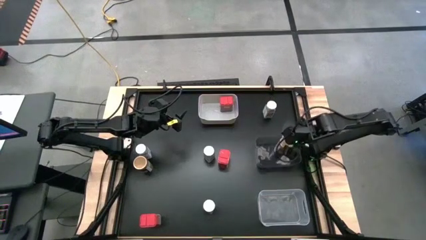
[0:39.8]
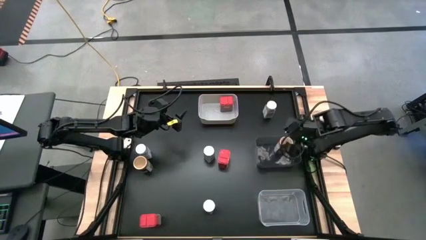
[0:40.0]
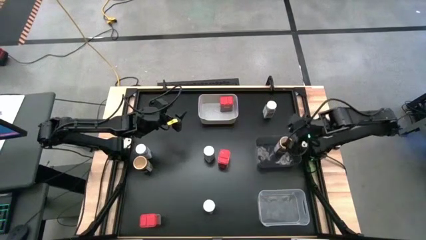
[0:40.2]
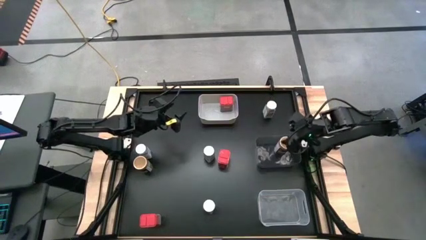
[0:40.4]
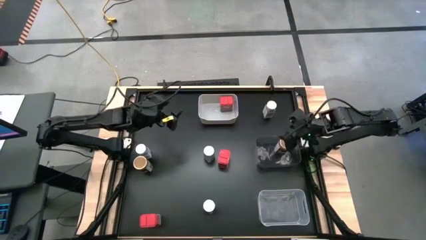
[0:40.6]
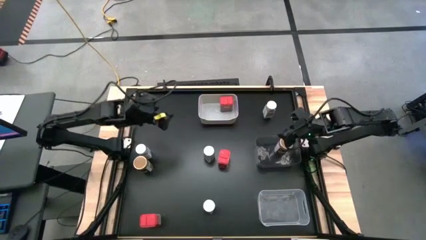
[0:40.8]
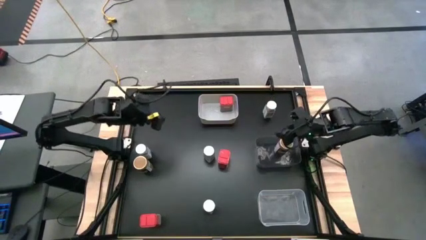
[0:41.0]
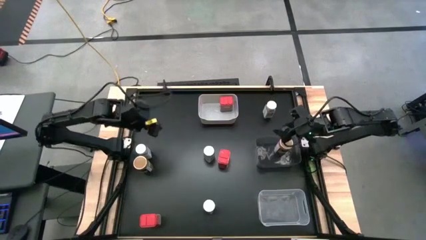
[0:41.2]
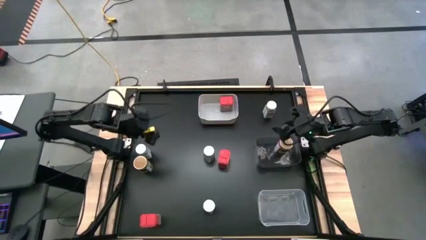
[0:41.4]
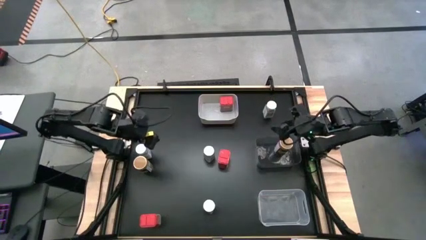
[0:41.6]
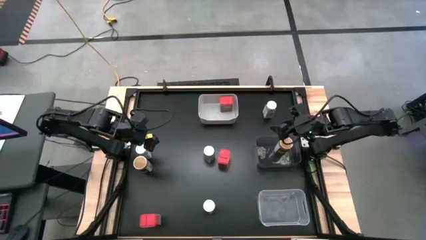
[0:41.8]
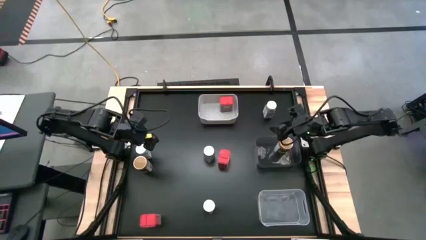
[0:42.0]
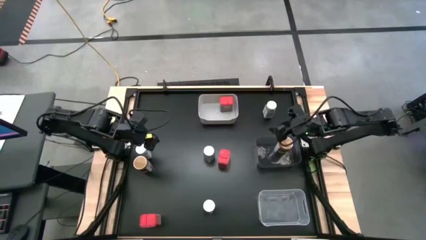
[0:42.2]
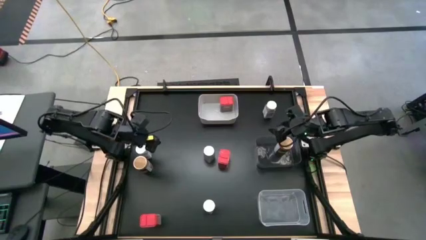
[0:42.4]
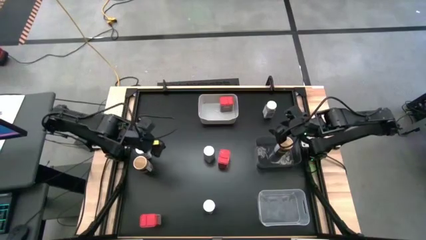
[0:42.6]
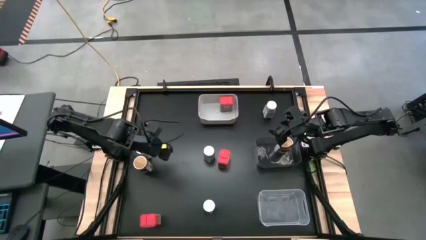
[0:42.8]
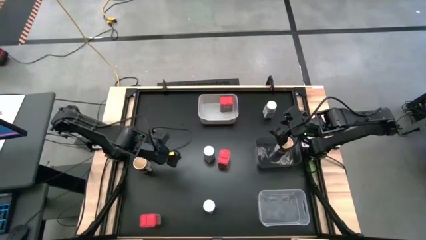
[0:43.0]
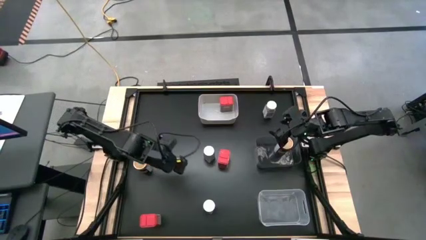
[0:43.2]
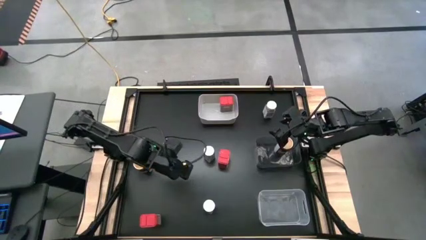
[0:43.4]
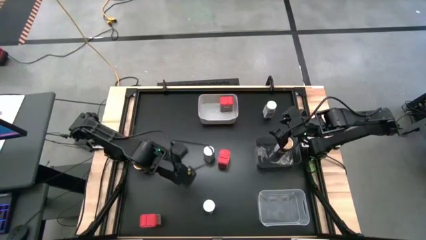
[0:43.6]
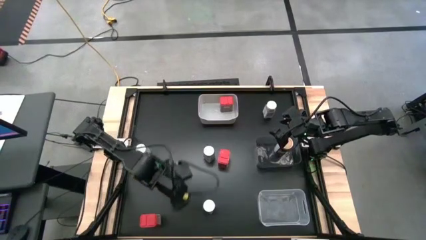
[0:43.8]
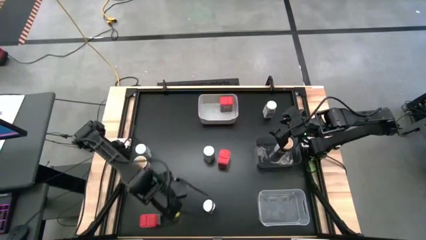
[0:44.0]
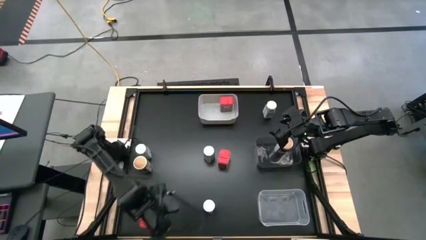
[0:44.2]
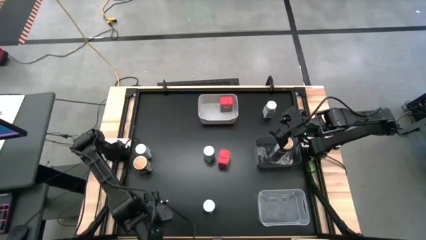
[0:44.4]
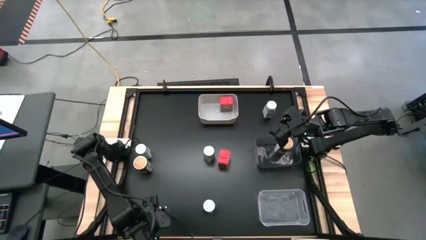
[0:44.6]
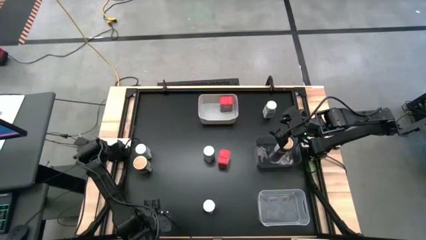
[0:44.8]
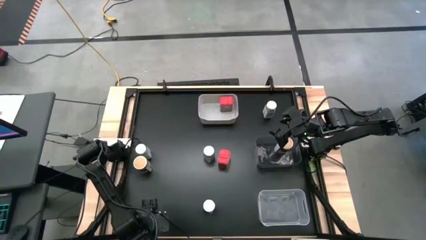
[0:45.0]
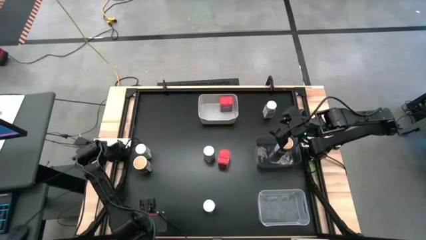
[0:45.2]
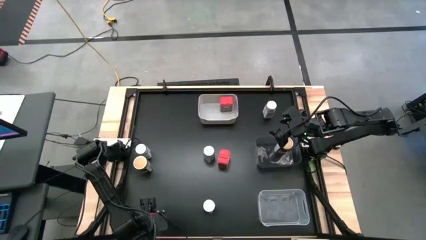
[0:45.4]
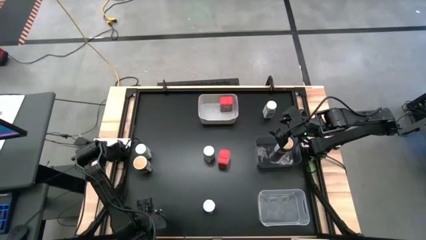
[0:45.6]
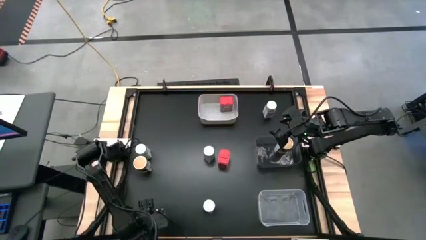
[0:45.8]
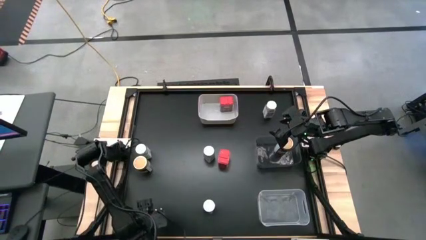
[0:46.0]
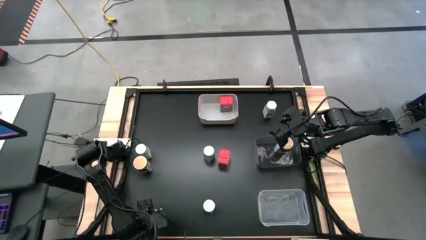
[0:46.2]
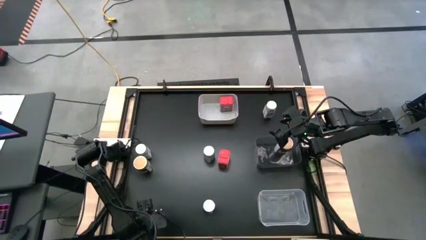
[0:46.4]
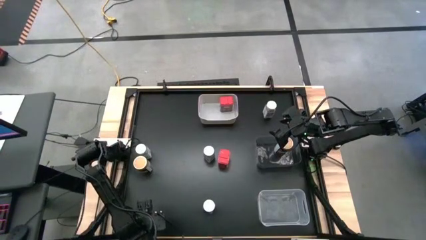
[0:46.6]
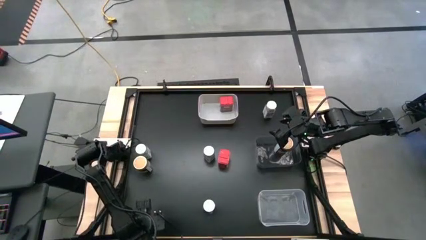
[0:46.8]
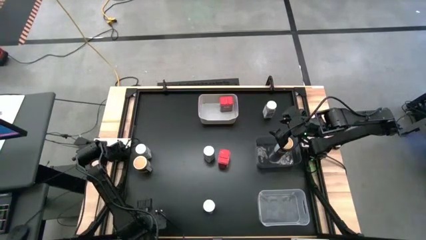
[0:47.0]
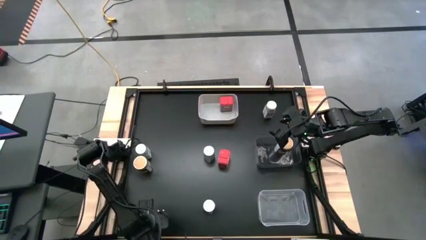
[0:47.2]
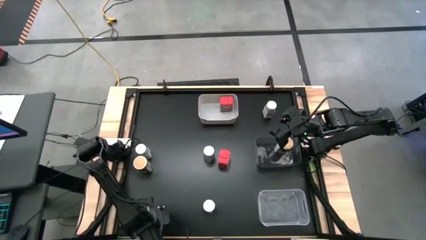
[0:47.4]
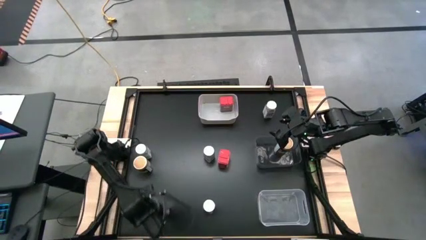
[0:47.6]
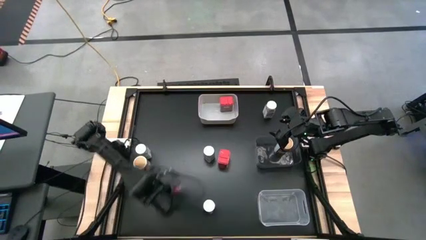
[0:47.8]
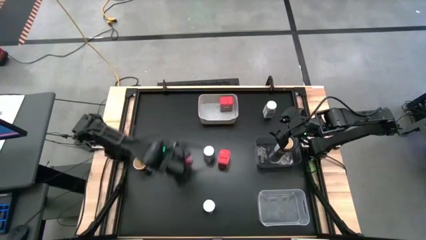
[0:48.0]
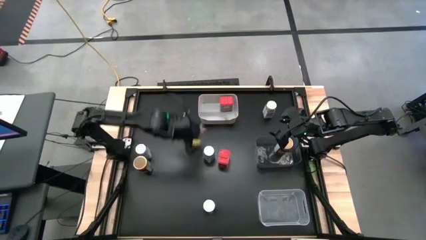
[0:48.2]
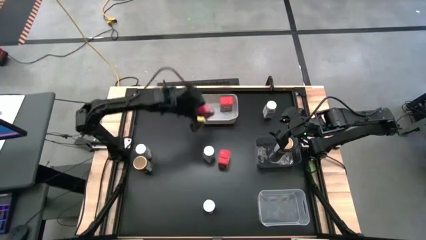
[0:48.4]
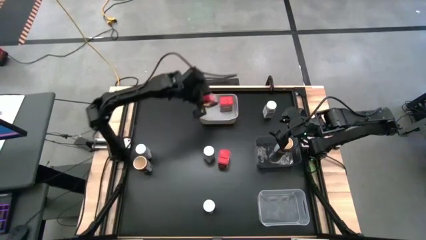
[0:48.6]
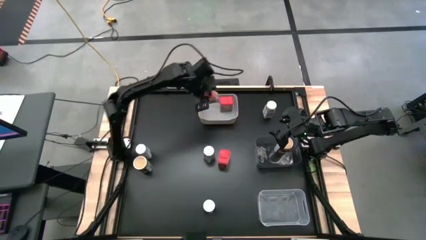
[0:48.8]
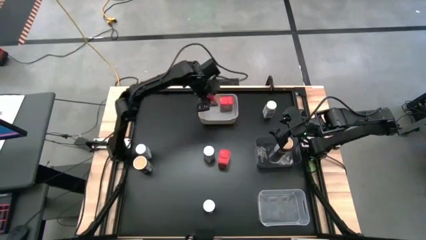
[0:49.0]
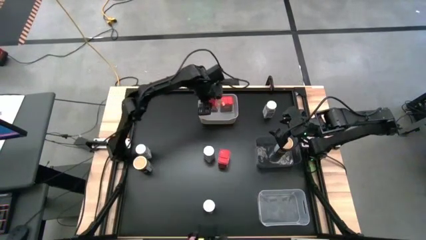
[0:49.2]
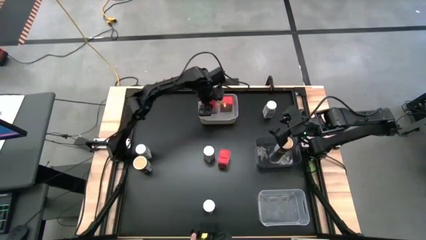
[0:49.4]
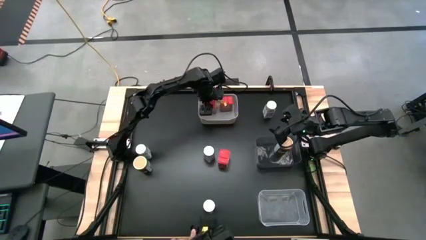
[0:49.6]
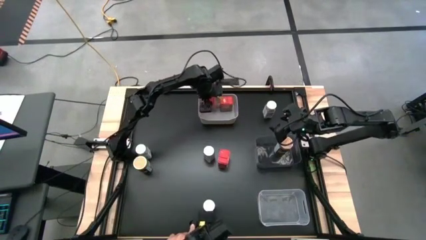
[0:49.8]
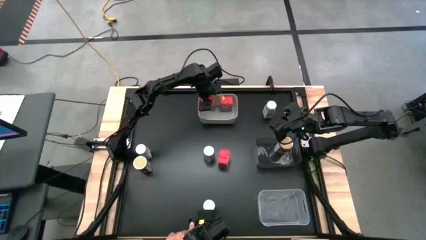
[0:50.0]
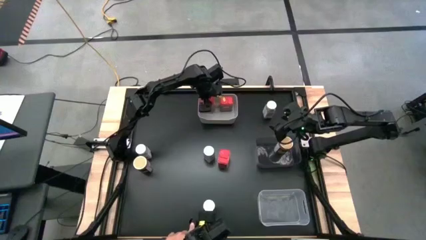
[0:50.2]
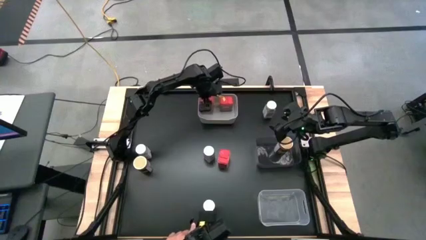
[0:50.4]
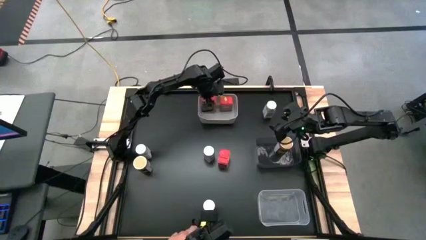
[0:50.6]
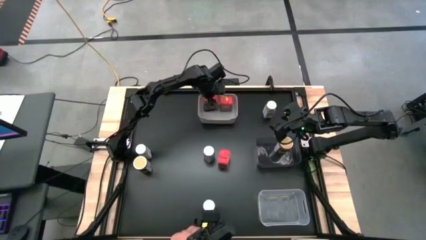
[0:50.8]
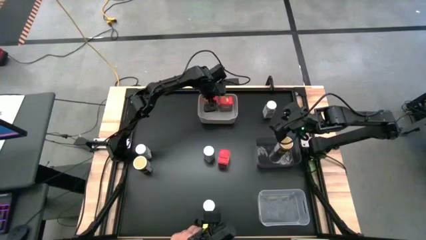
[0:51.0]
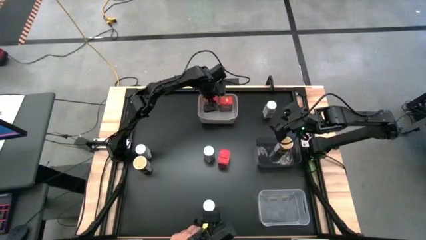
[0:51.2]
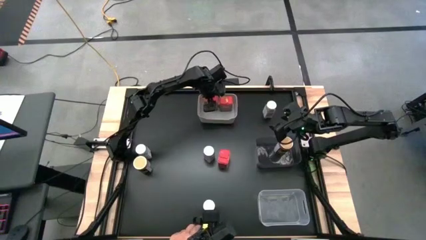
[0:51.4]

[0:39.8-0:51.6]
Task: Sort spices by type
Put the bottom red seasoning can into the gray bin

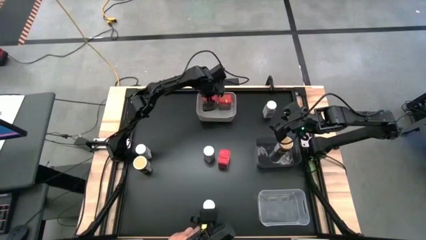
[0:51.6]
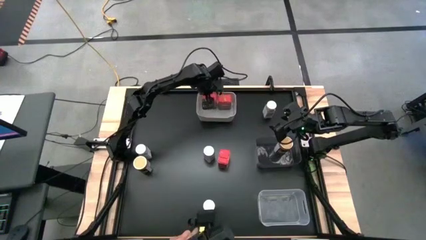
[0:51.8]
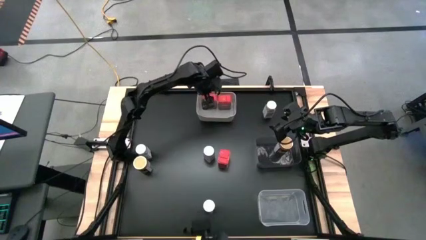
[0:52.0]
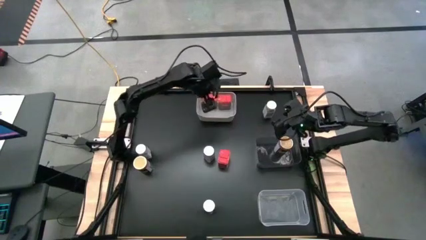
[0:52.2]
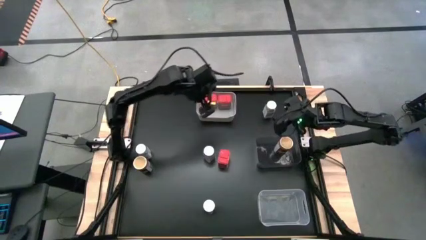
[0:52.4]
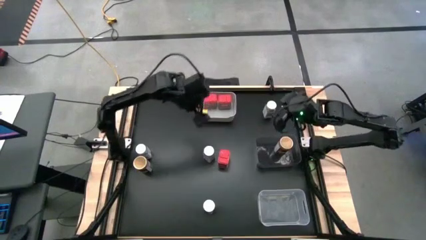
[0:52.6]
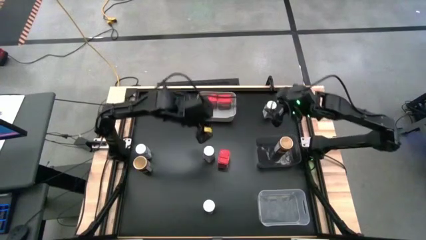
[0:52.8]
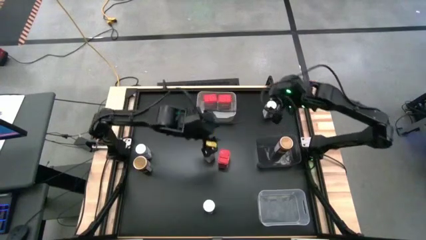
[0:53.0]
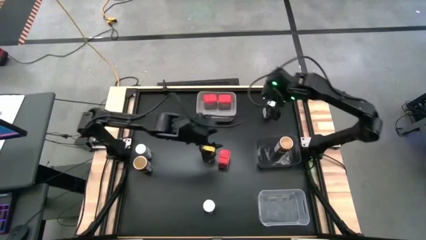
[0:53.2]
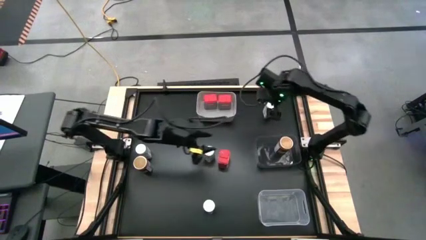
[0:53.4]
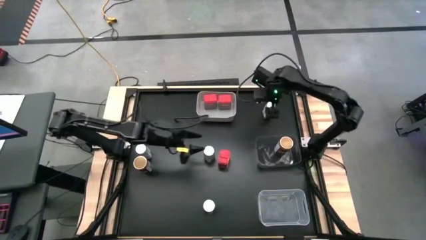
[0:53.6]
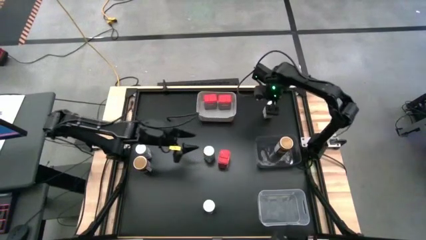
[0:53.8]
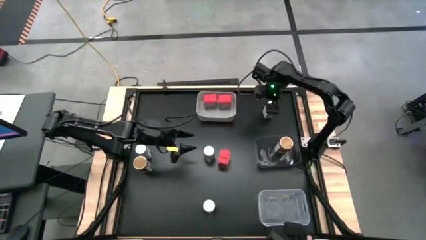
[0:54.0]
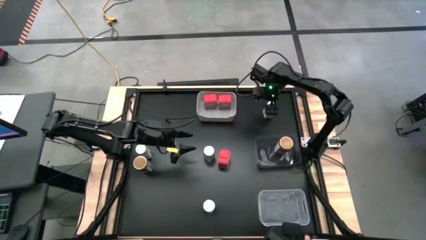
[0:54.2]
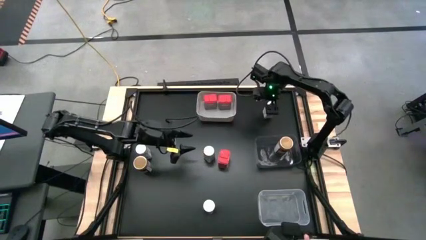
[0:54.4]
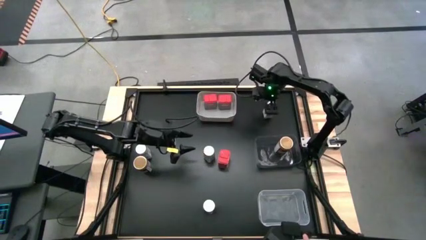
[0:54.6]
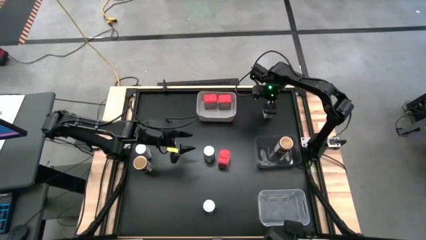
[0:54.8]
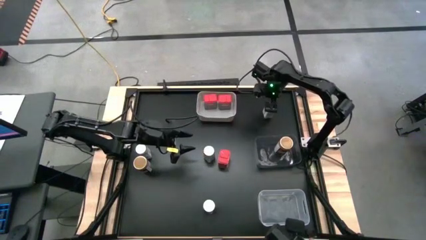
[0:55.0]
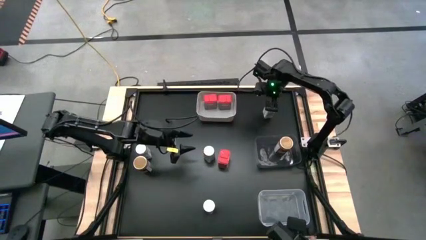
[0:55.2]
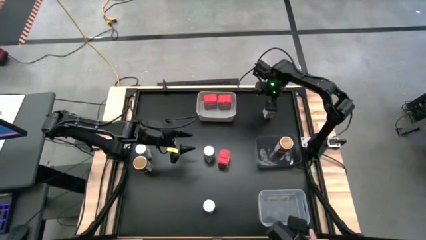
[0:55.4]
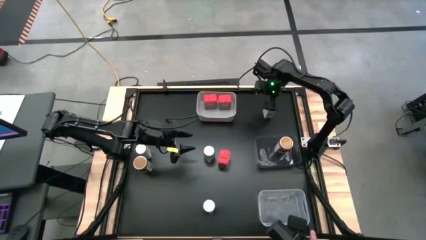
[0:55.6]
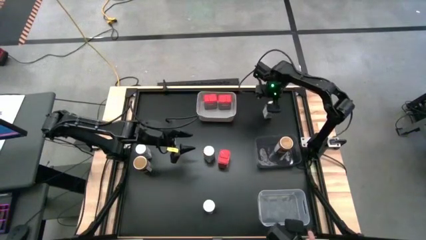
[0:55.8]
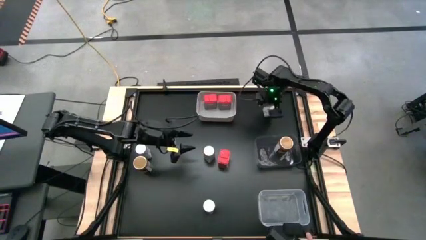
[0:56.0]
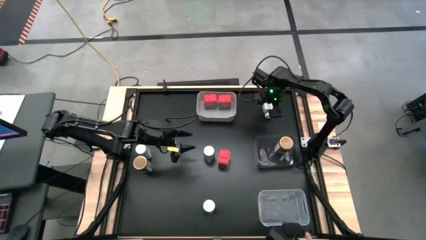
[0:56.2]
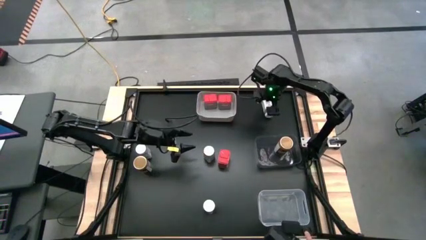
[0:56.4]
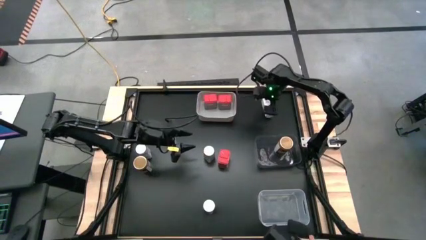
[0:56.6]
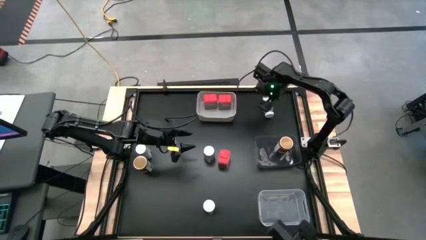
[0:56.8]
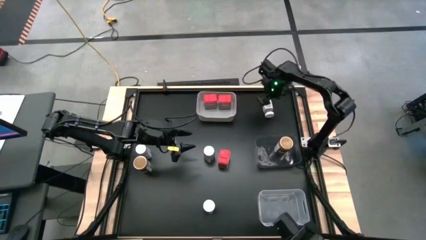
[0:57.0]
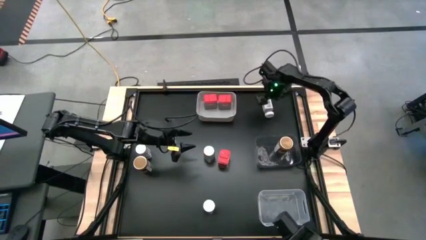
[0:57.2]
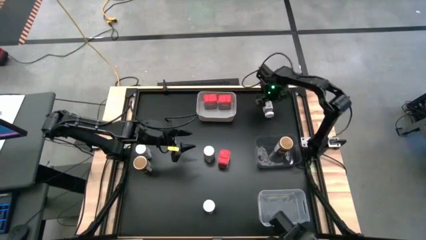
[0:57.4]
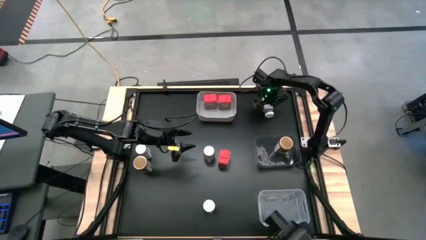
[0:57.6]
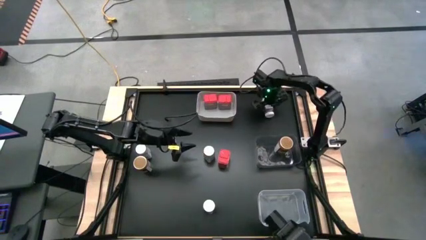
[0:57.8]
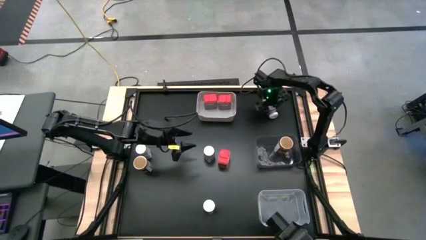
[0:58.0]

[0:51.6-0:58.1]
Put the top right white seasoning bottle into the transparent bin
